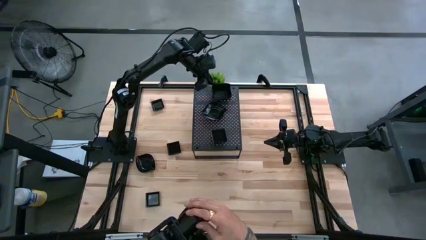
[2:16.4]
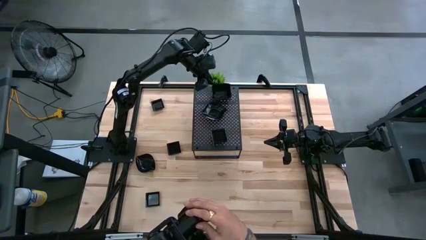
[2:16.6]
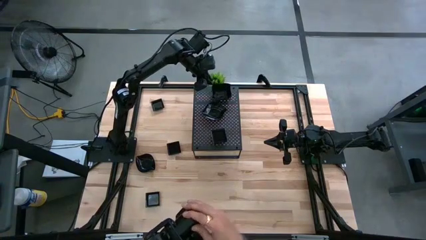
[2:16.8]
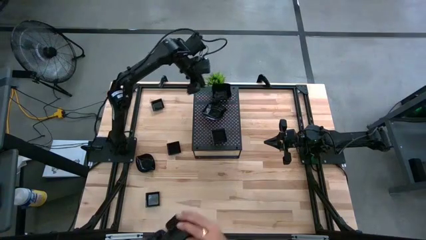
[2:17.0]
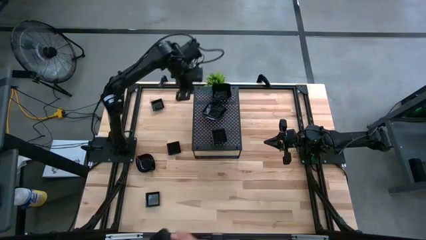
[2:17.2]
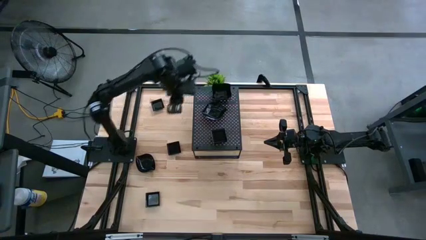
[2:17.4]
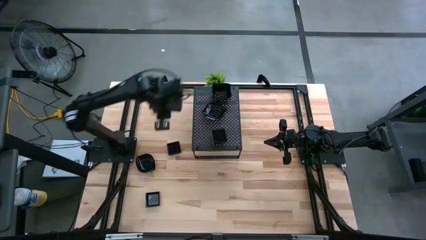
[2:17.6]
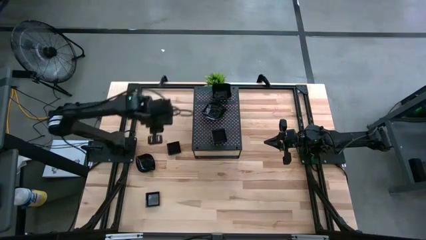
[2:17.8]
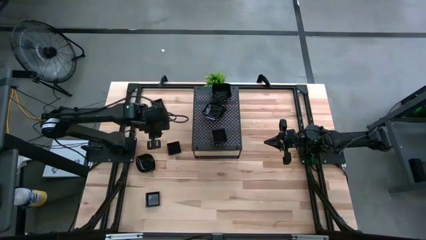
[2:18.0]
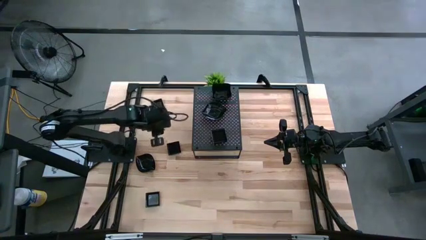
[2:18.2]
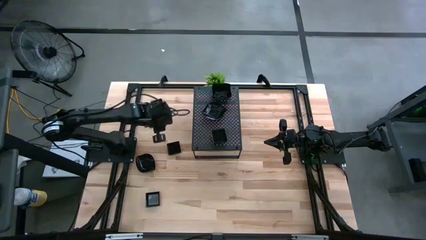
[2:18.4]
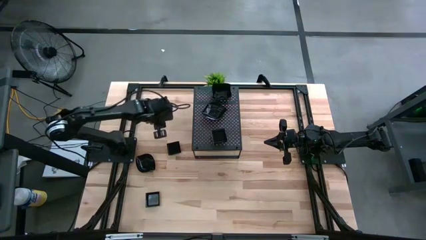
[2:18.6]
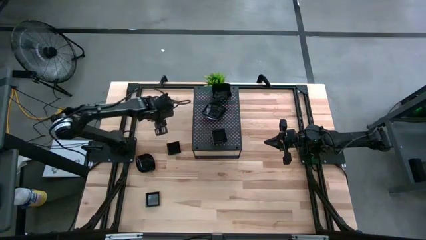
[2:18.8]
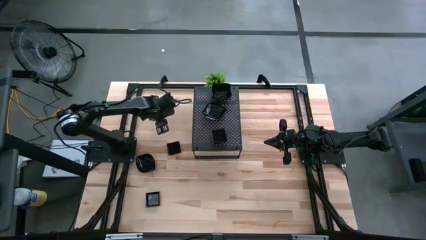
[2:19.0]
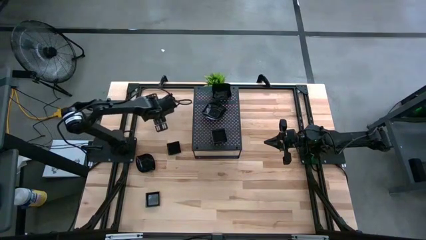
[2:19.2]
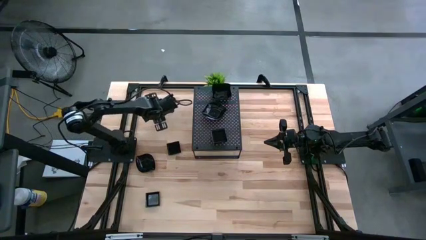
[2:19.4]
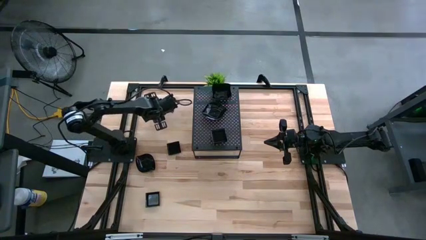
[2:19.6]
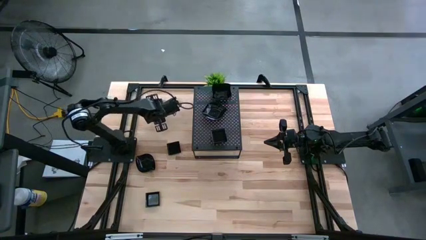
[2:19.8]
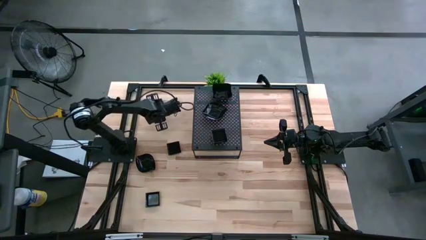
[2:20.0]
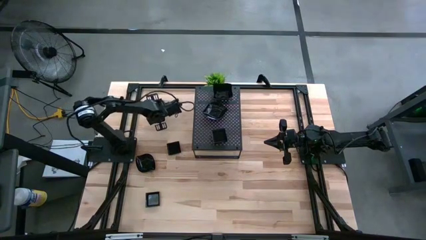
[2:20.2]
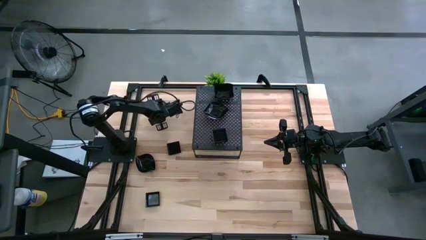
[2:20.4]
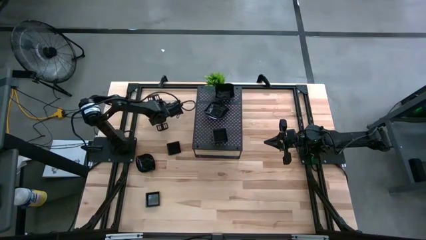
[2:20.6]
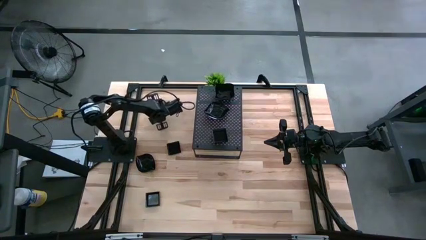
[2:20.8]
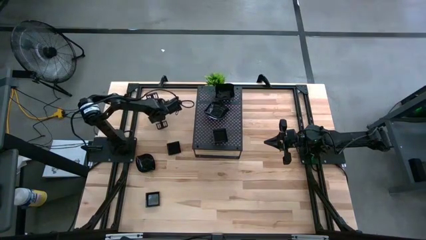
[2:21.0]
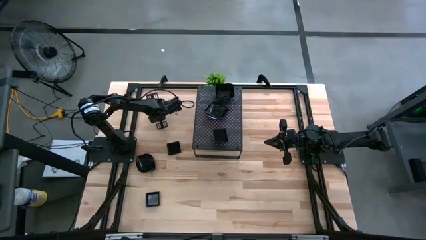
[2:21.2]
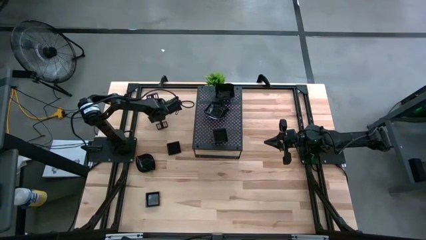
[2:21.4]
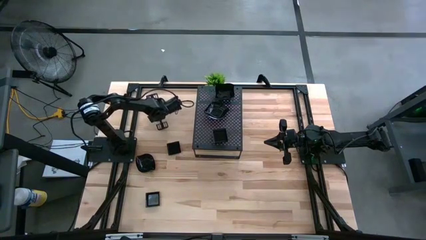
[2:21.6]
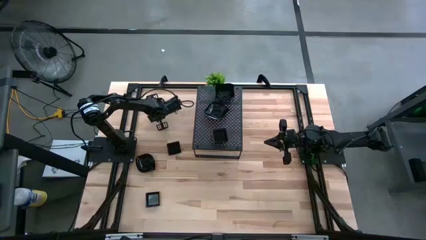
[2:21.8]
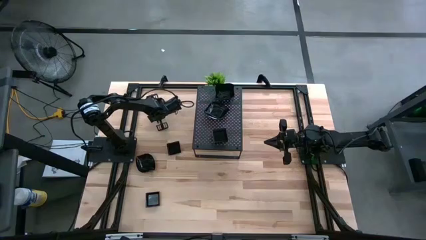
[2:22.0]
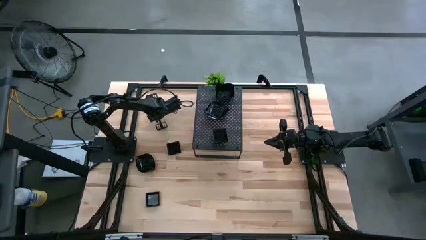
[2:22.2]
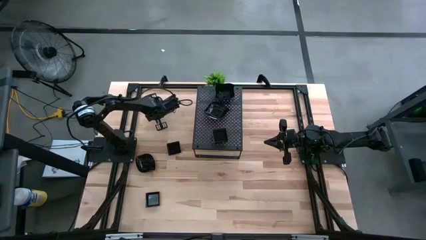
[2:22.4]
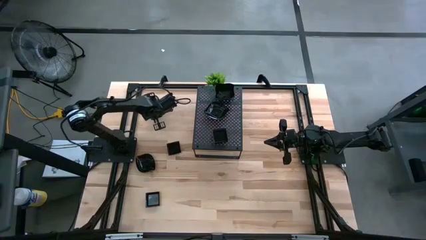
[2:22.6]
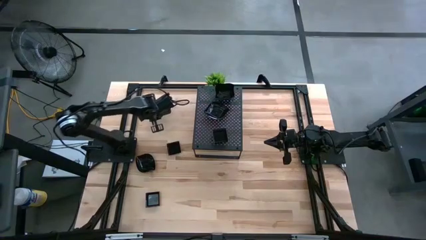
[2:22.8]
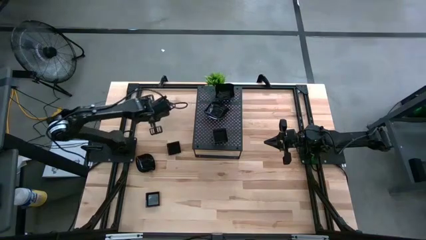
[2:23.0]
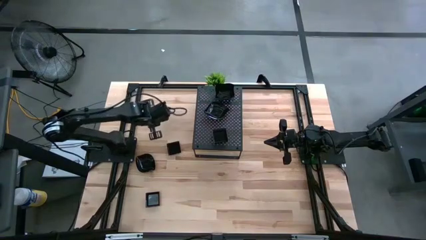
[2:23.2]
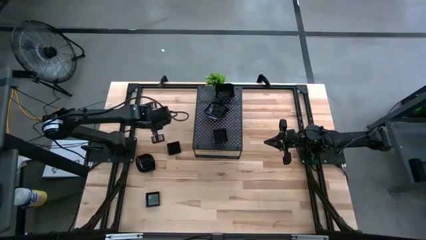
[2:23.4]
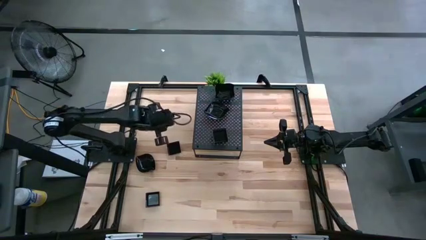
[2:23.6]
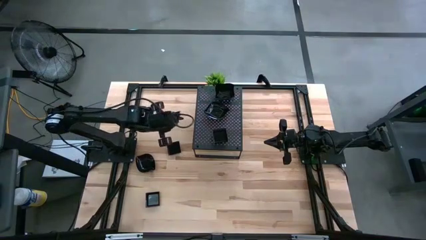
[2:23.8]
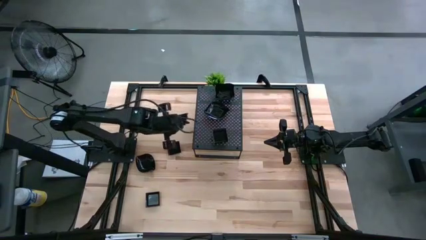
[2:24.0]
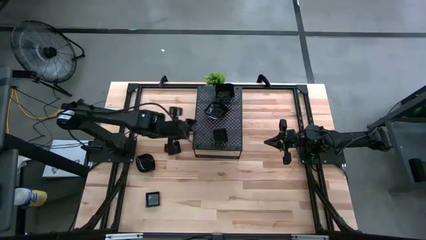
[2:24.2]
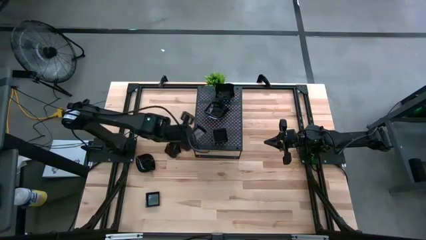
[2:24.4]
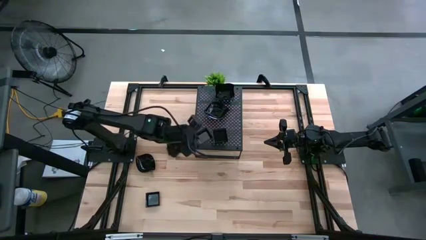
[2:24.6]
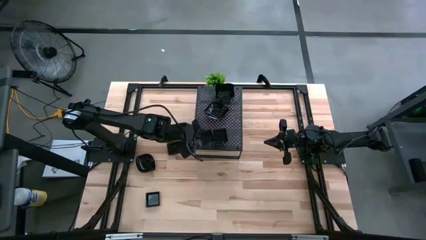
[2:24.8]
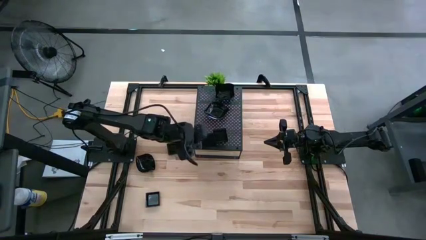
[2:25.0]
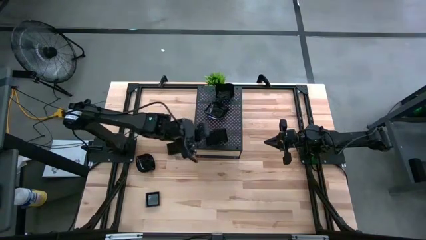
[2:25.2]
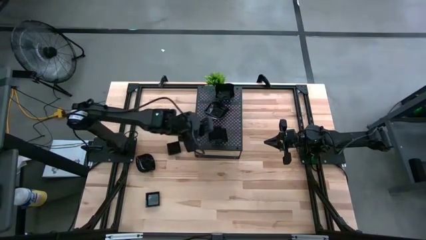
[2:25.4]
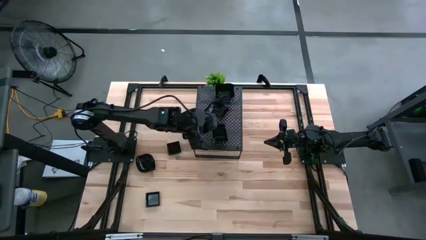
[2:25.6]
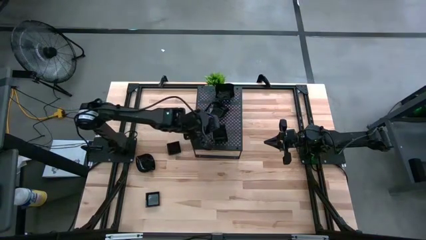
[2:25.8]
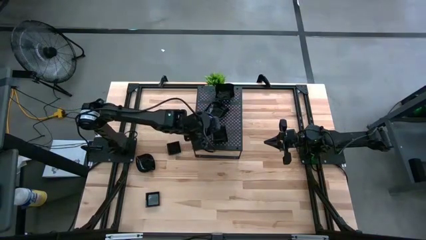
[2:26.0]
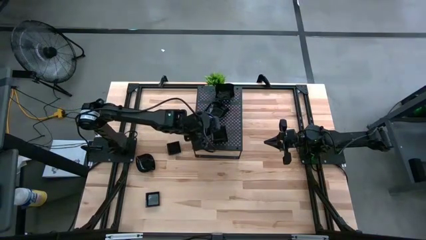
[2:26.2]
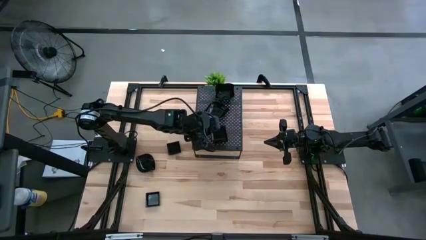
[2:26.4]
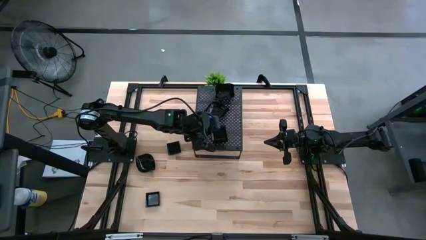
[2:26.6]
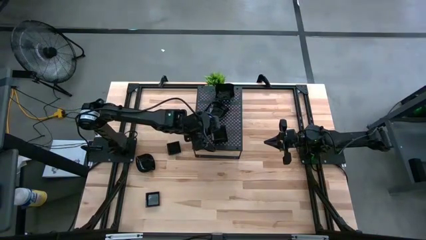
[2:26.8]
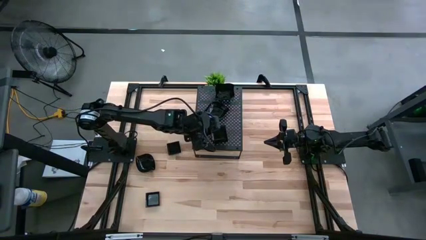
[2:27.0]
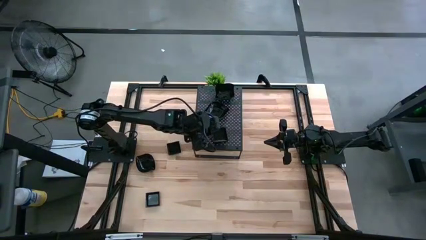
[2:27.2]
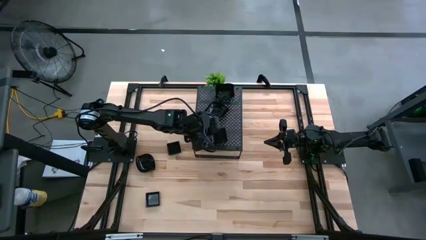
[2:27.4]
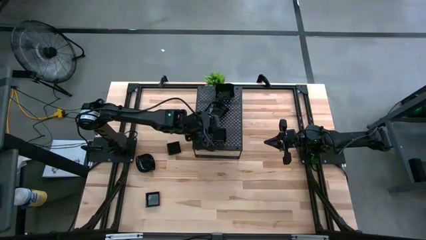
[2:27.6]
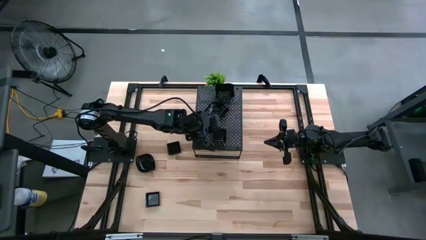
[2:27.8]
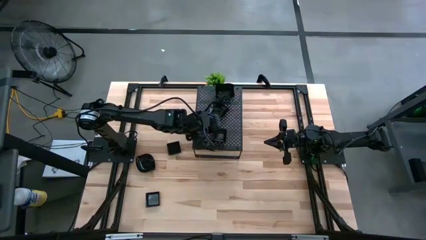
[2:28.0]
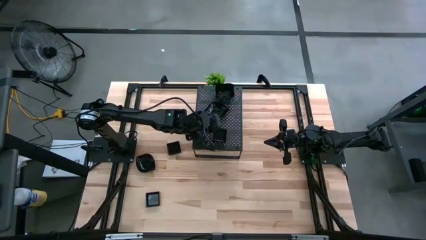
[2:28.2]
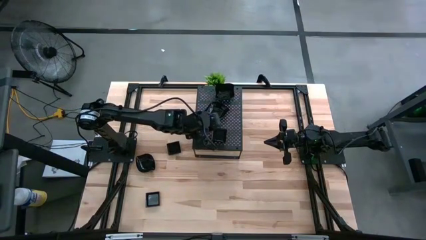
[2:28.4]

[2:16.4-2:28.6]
Task: Pick & Place Mini shaped plates
Stack the square plate on top of the square plate on the shelf

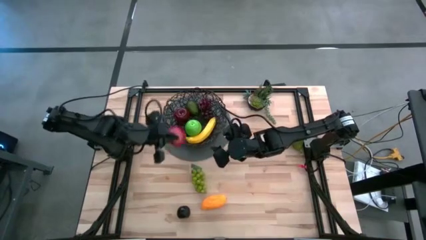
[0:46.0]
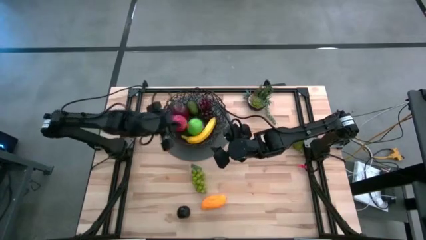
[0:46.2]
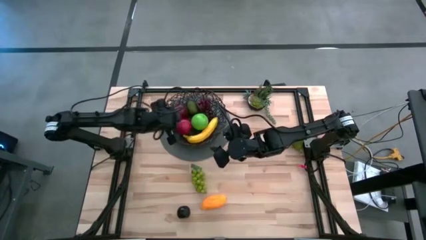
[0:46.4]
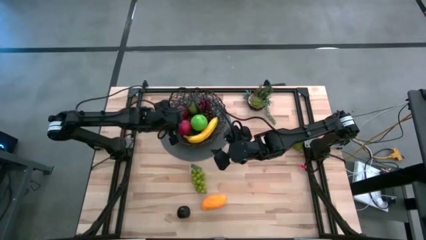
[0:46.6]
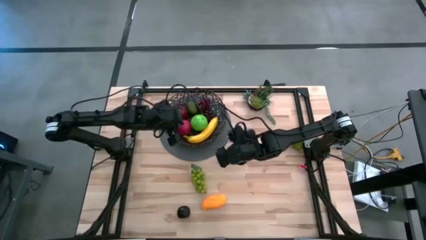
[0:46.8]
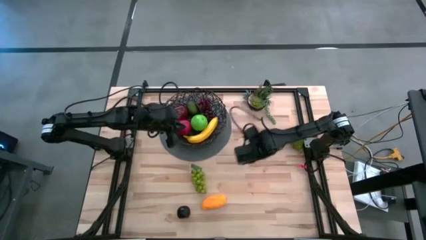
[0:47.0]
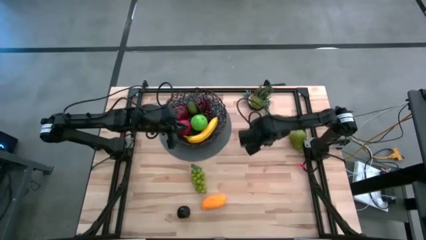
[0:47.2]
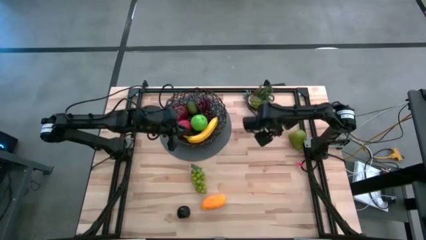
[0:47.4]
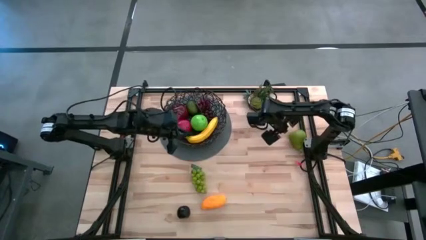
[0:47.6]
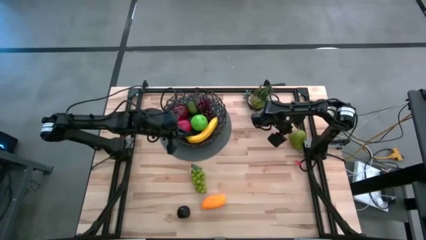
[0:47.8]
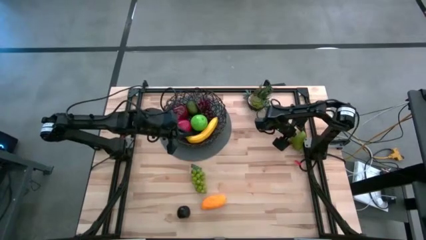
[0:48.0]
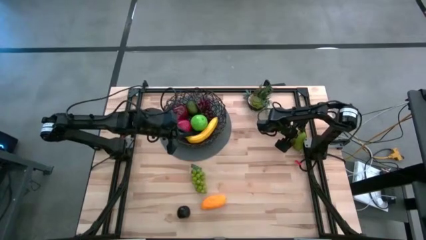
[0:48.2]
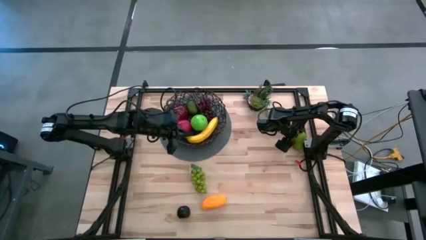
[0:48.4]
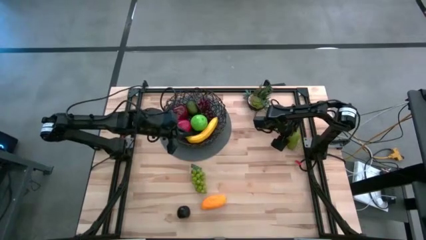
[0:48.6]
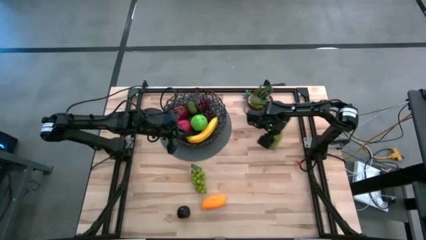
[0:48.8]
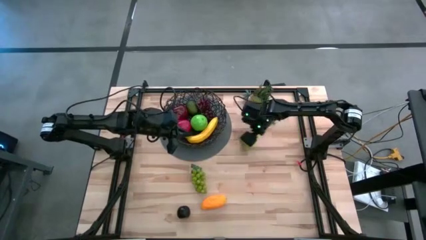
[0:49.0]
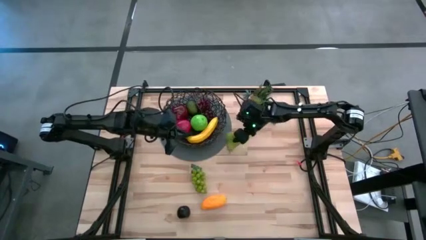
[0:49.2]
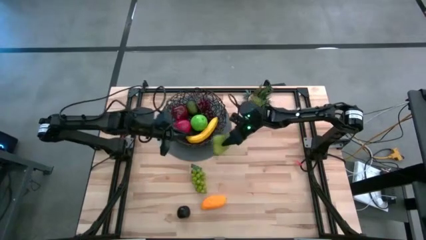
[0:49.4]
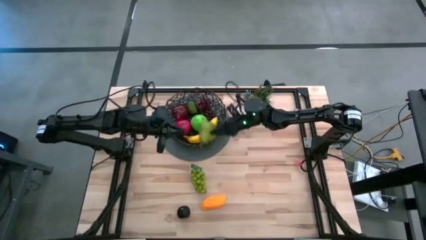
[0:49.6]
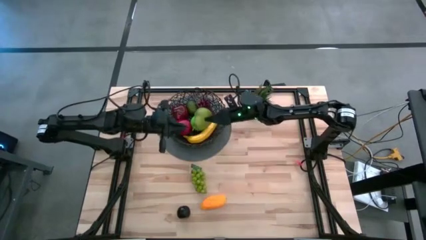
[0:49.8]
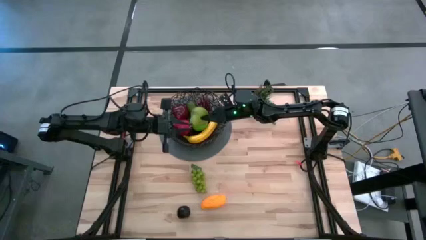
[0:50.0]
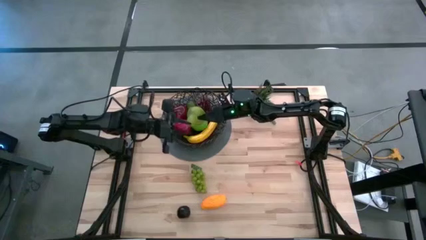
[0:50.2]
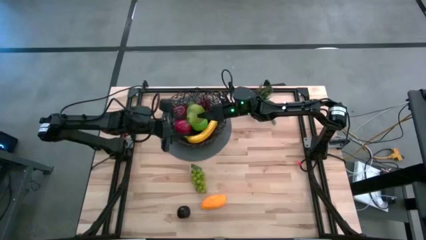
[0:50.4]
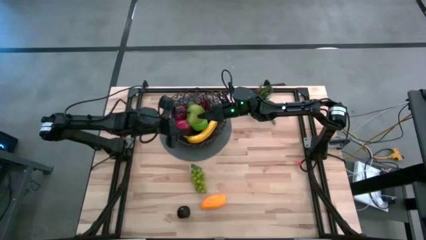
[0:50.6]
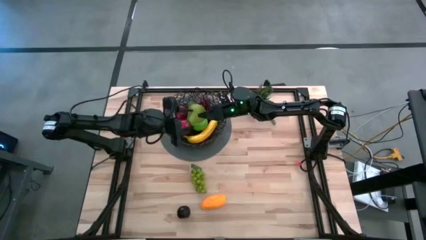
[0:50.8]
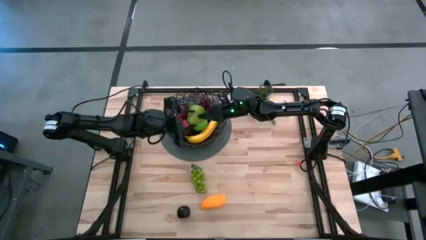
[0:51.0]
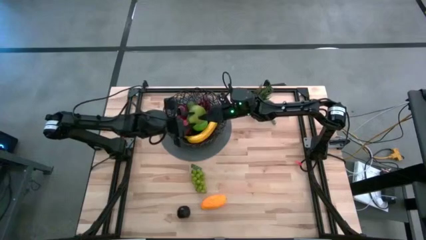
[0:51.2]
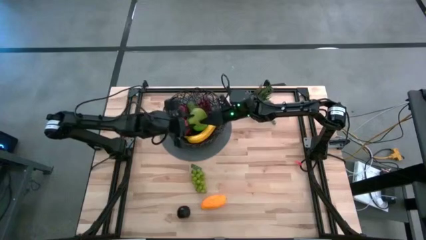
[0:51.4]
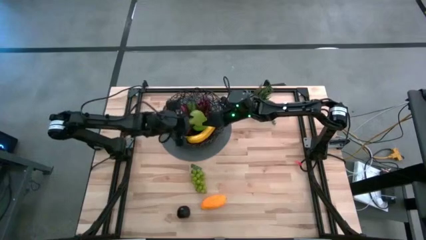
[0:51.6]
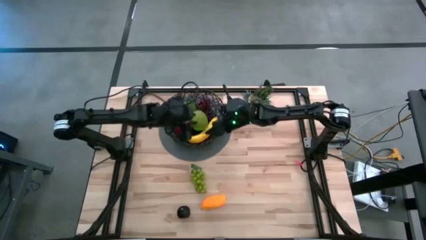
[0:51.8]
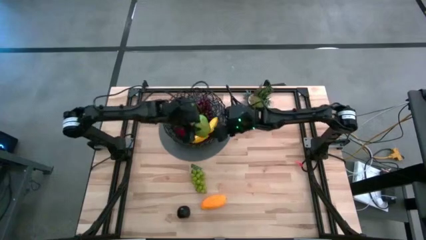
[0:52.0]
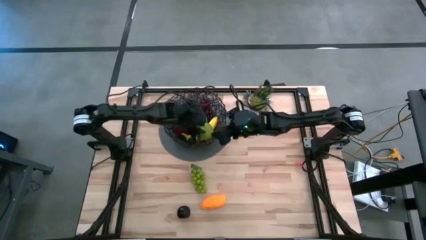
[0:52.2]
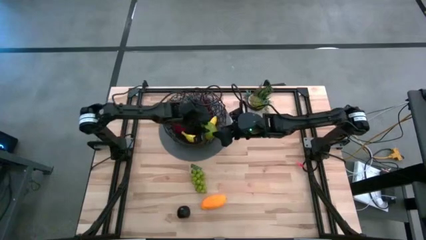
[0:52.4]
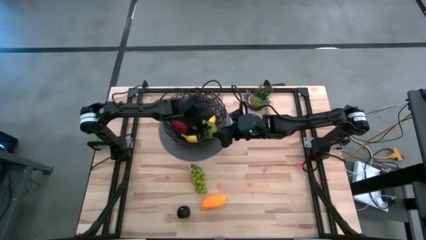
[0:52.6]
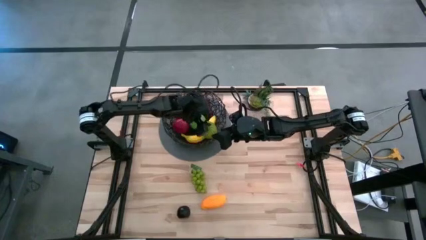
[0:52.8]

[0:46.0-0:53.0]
Task: Build produce basket
Put the green pear into the black wire basket
